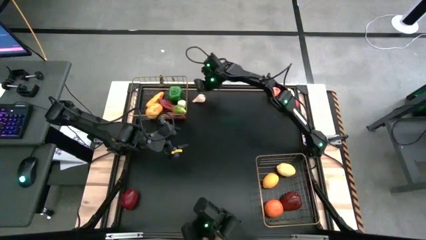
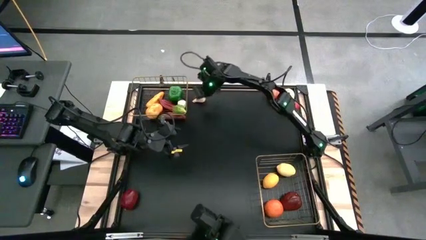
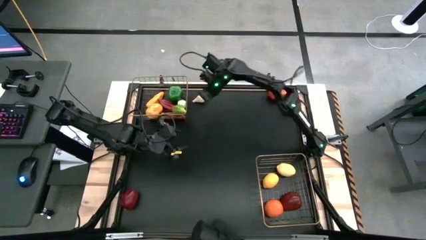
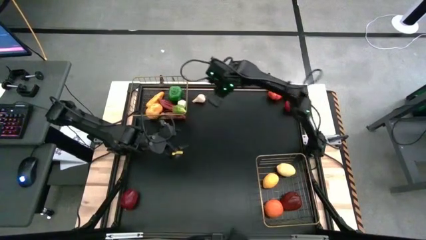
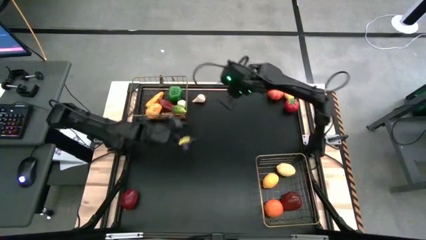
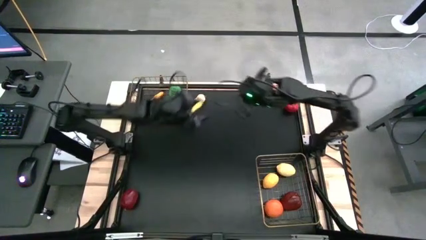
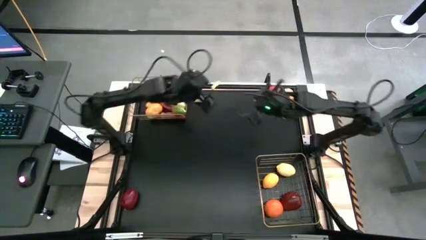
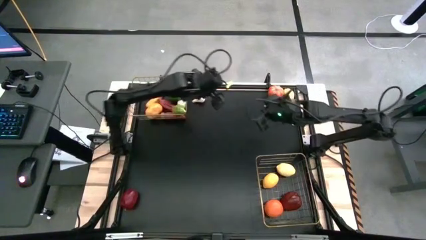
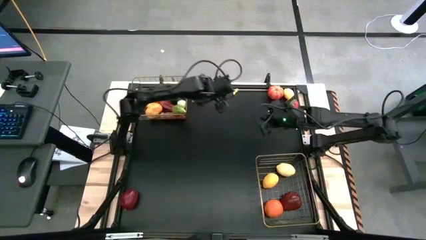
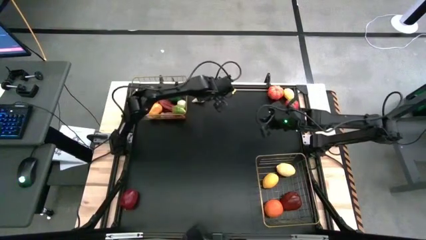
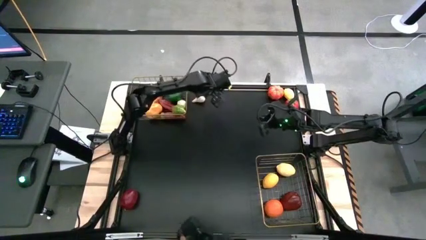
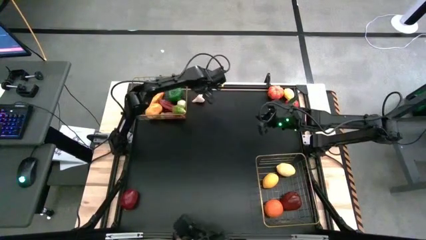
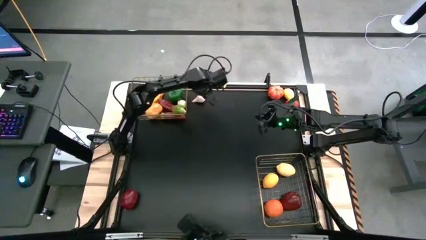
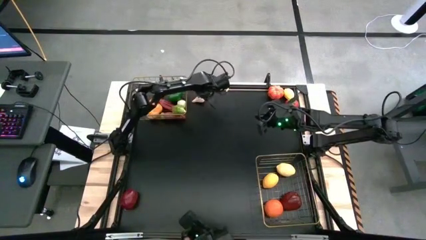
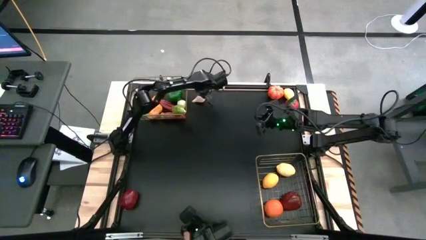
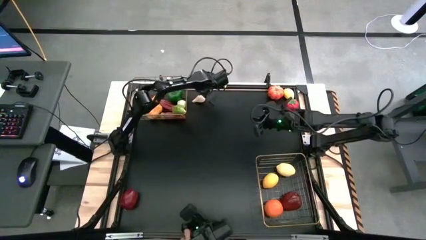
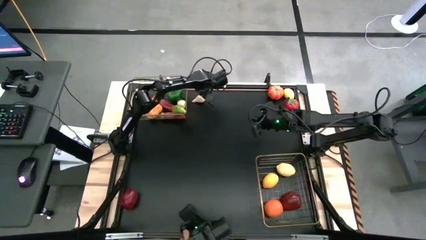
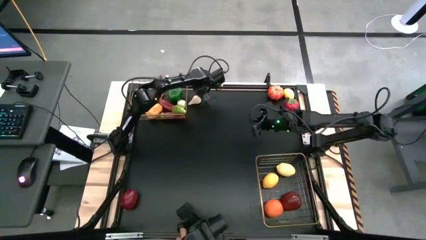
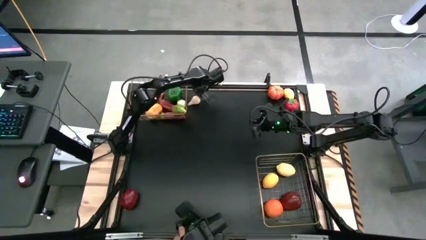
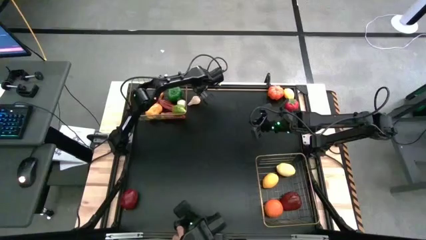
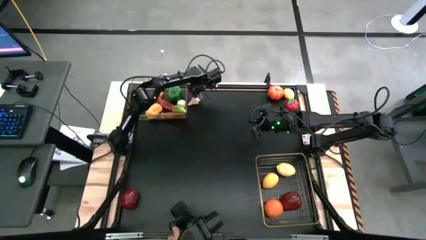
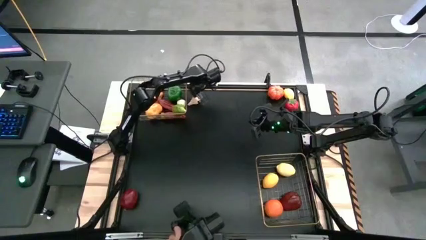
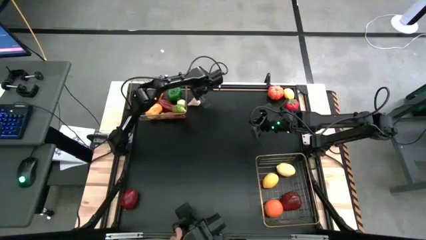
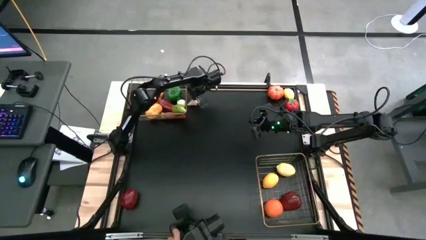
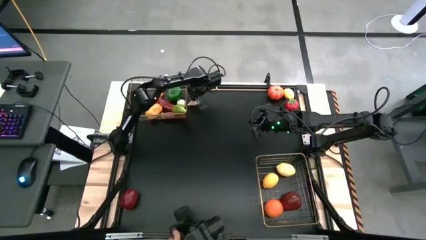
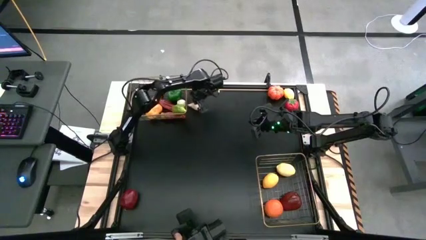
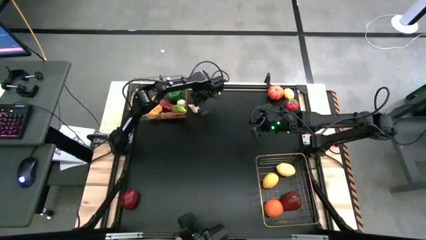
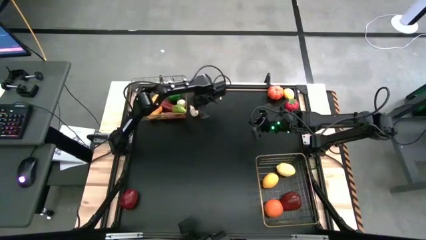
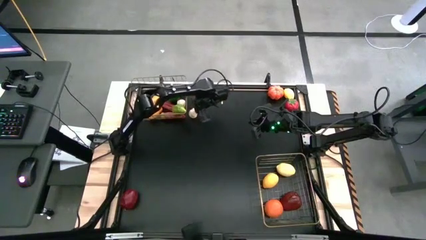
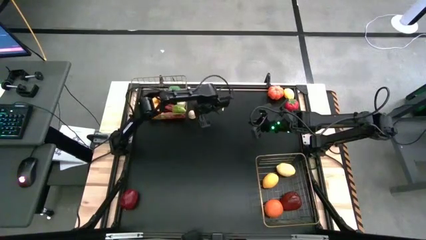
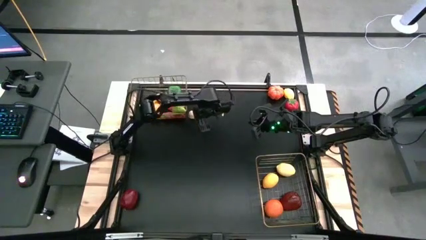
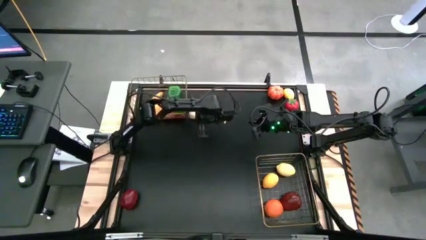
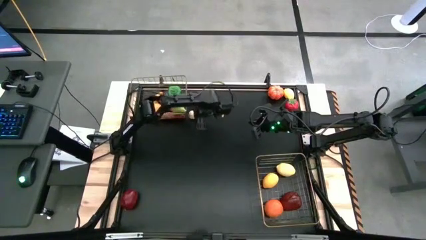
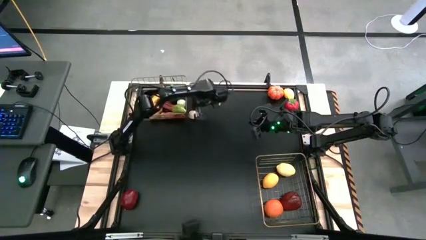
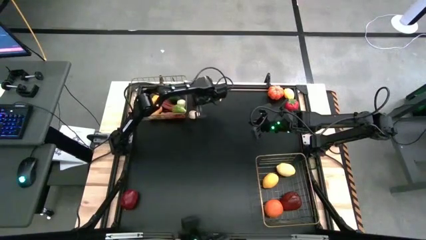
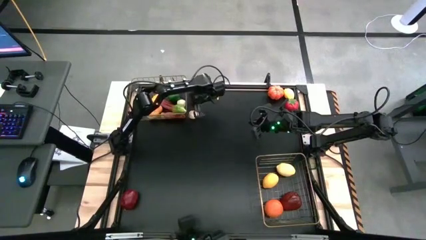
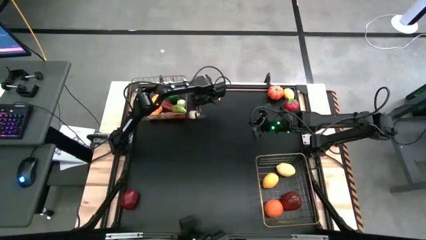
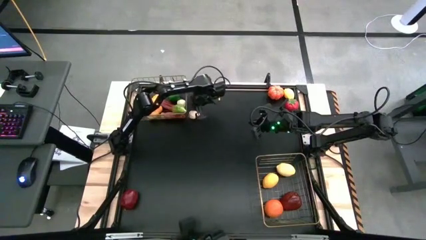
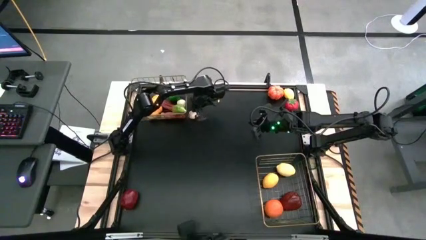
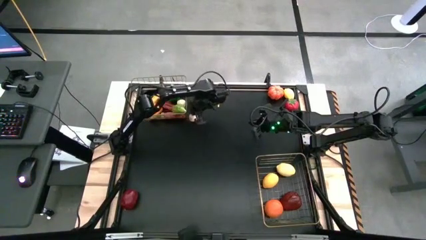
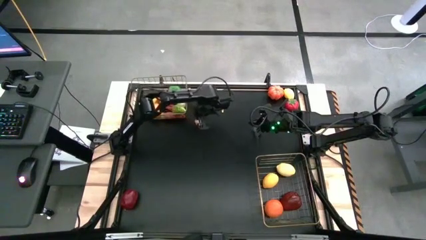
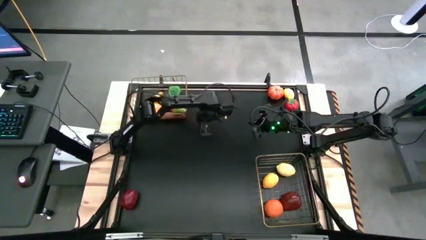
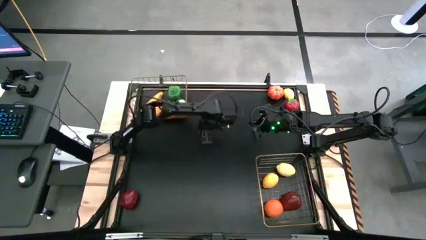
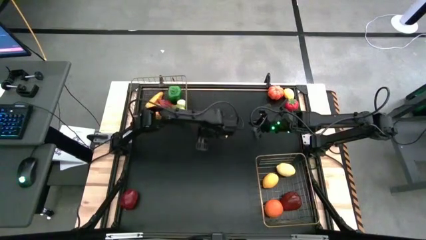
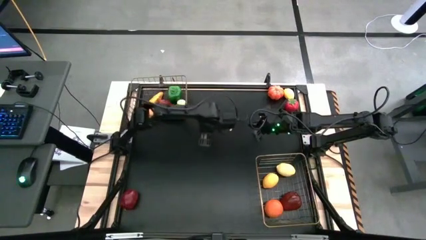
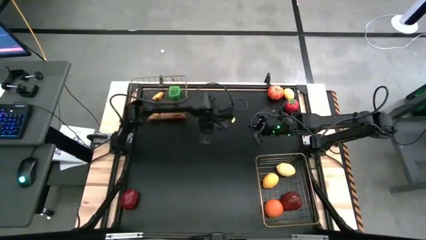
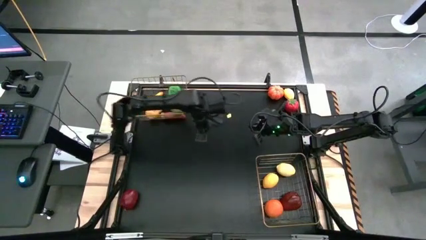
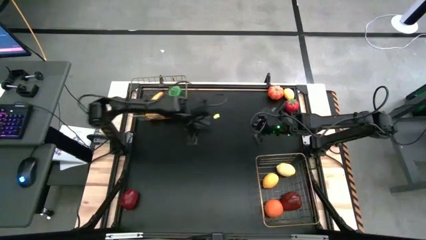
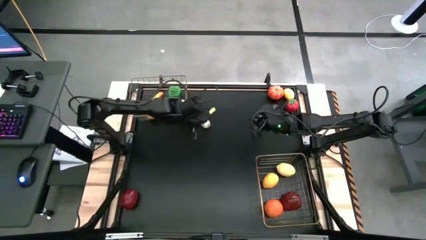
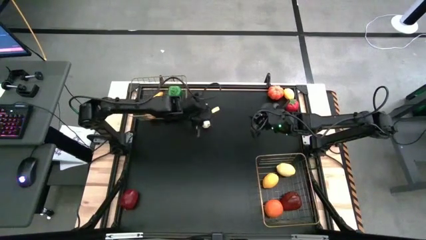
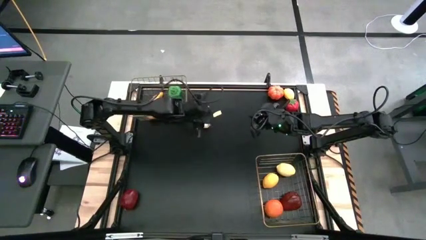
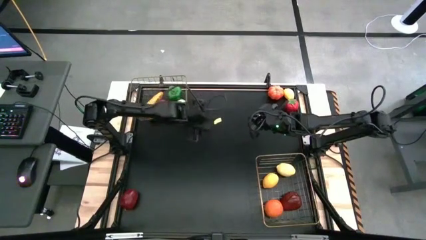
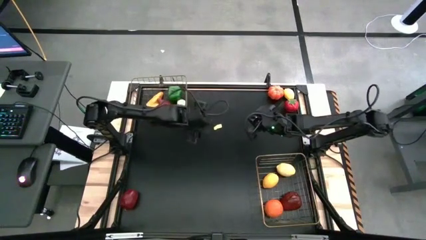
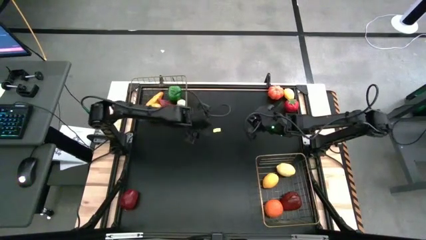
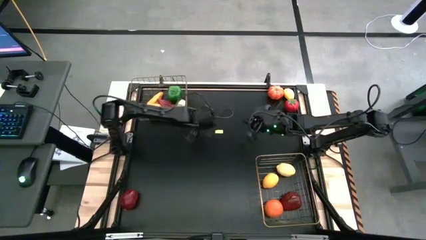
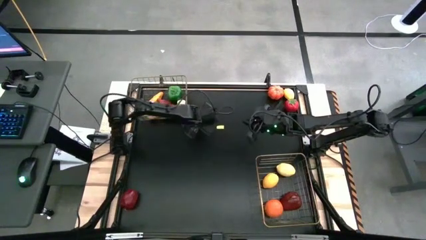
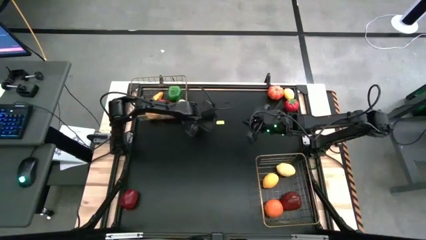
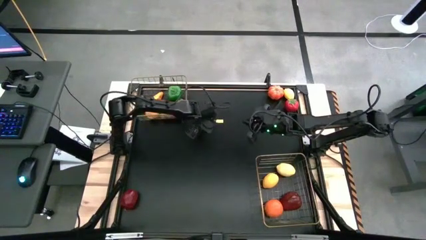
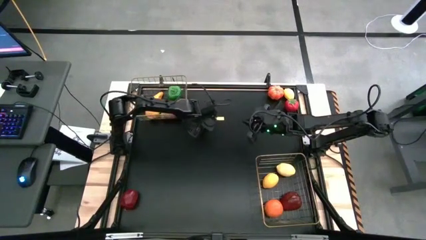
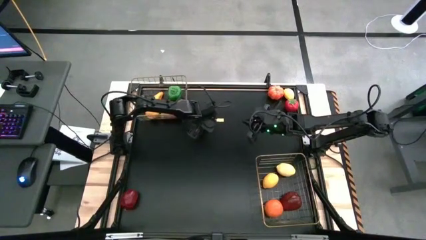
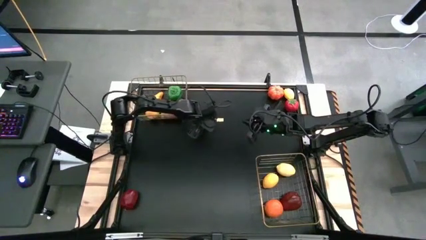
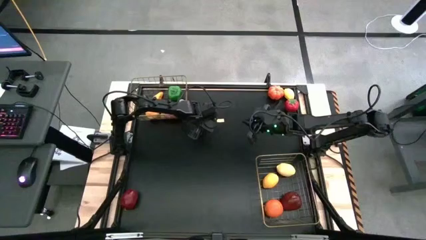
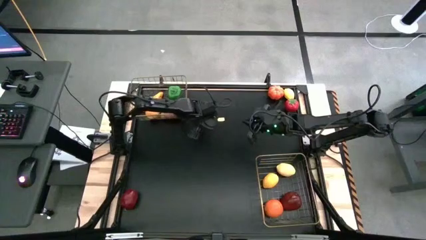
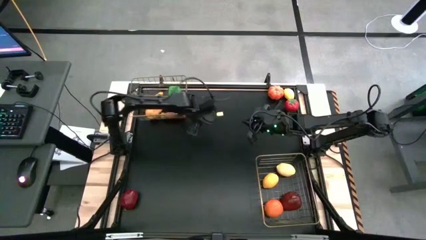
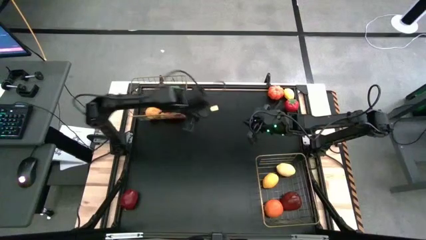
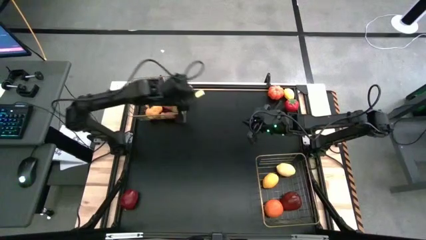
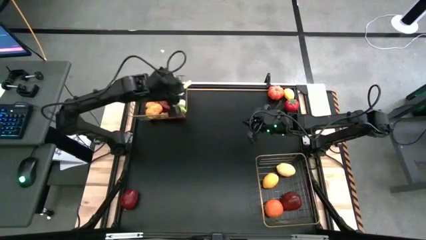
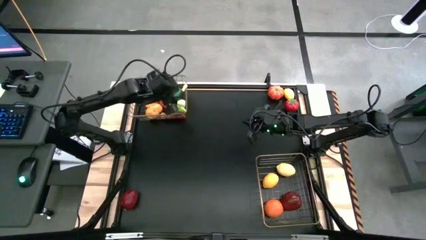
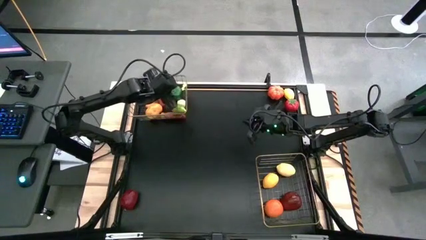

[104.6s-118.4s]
Task: Sort produce into baskets
Put the white garlic into the top wire basket

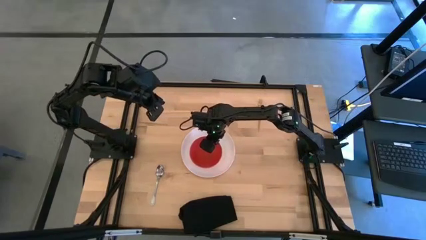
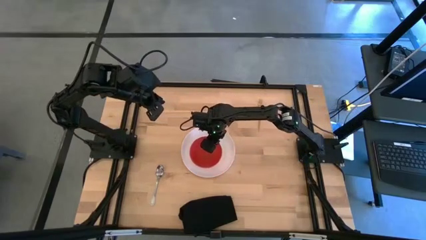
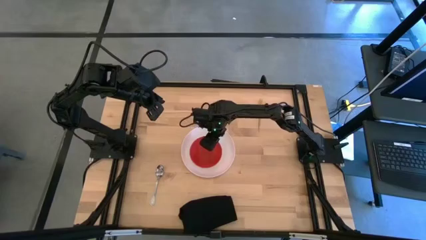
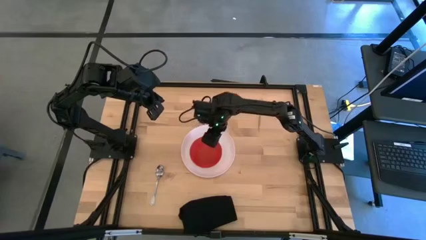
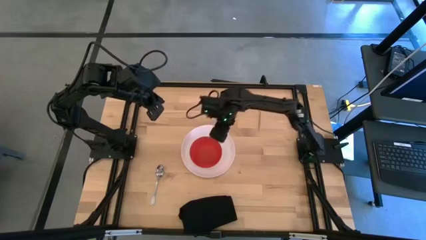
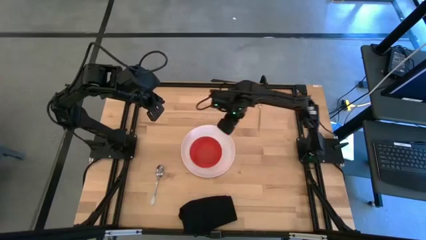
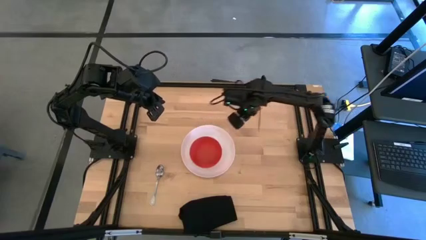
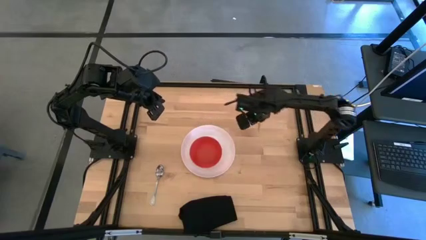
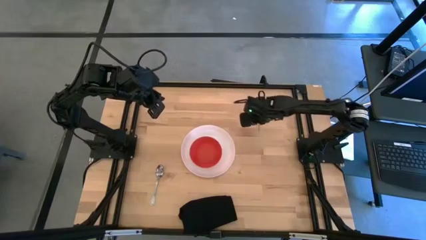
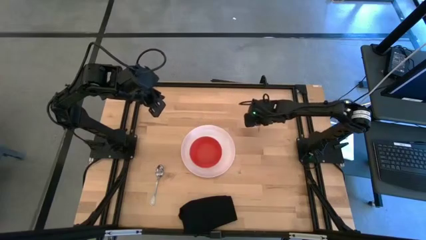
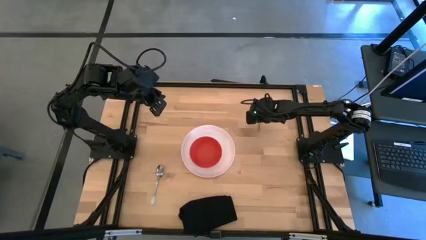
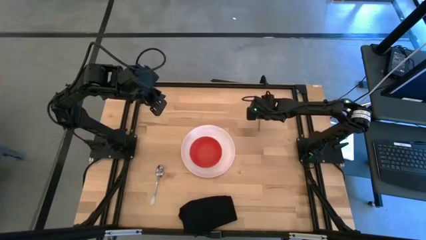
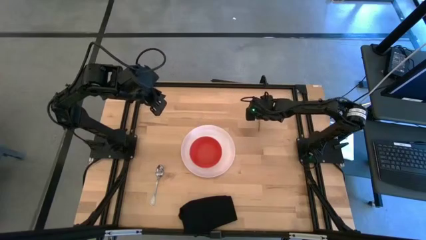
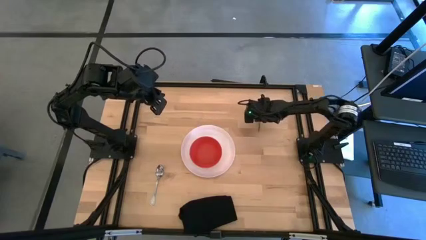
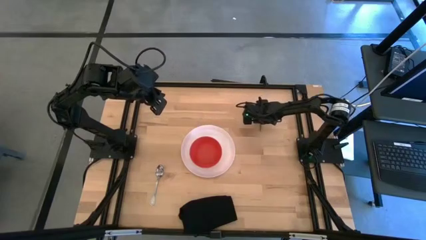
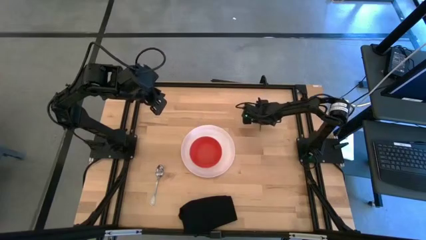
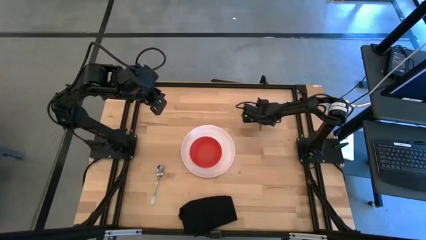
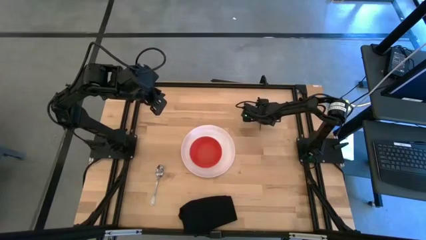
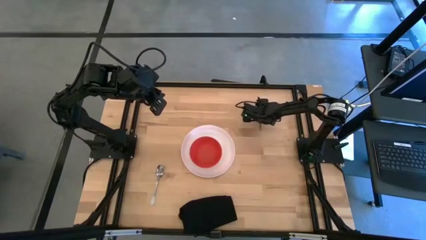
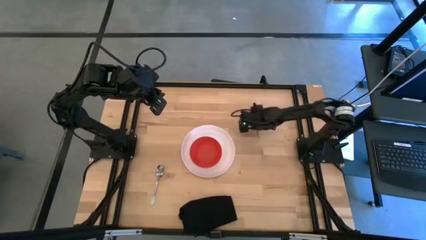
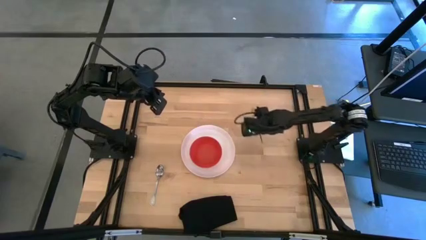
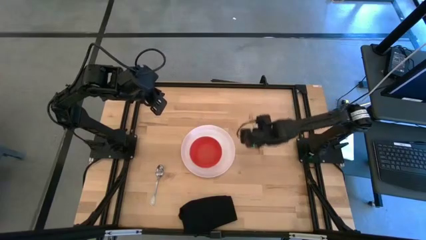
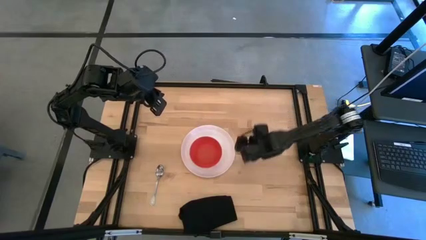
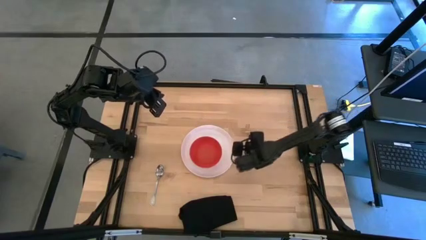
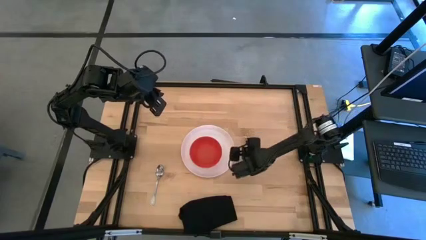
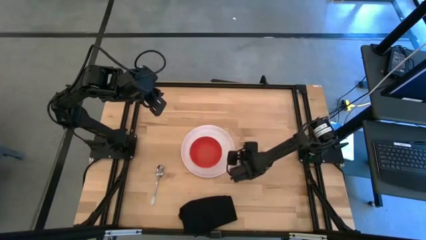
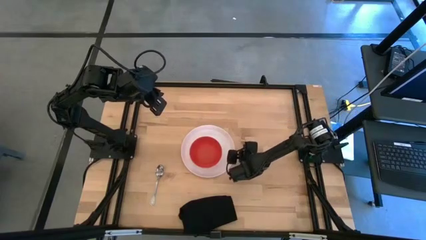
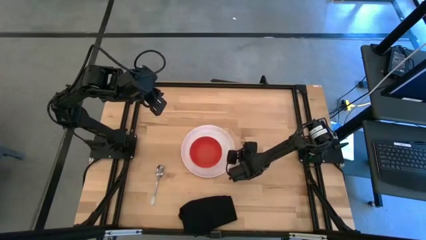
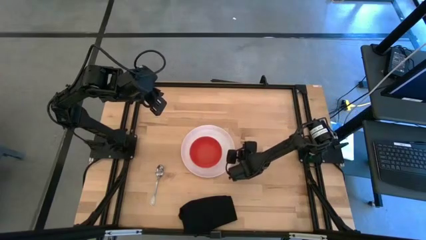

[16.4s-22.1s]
Task: Set table place
Put the gold fork to the right of the white plate
